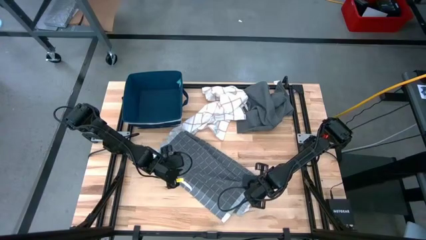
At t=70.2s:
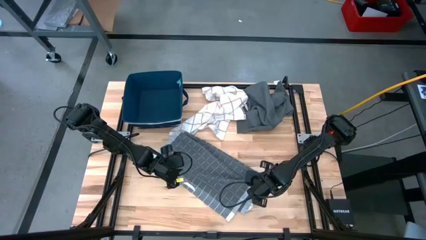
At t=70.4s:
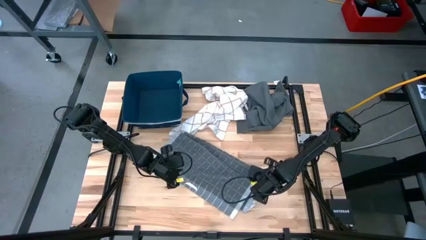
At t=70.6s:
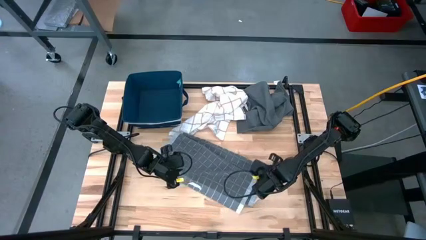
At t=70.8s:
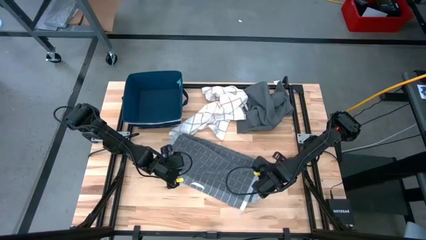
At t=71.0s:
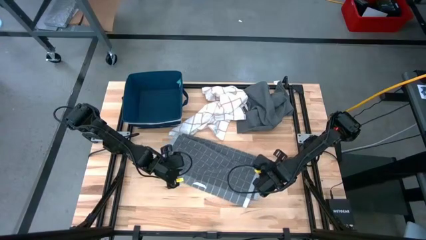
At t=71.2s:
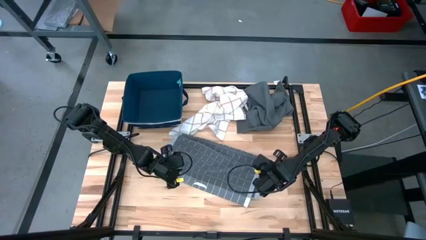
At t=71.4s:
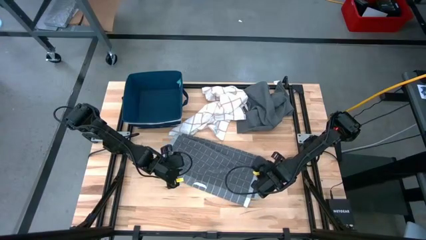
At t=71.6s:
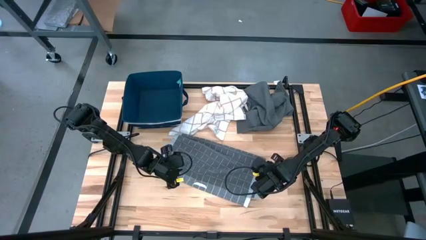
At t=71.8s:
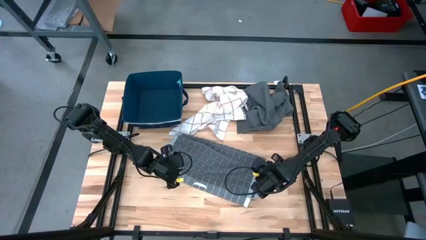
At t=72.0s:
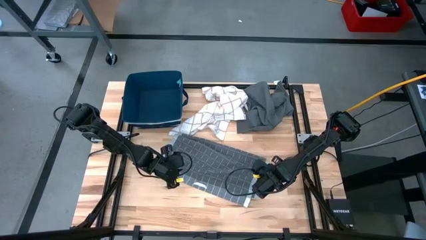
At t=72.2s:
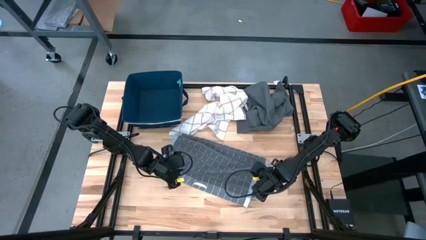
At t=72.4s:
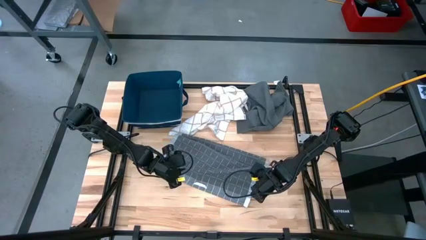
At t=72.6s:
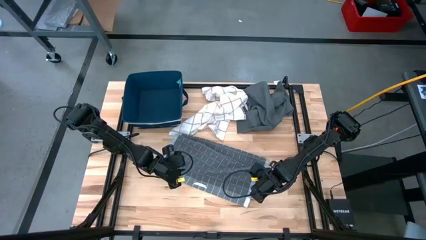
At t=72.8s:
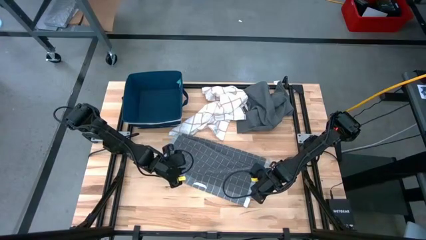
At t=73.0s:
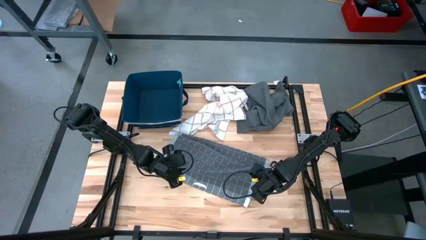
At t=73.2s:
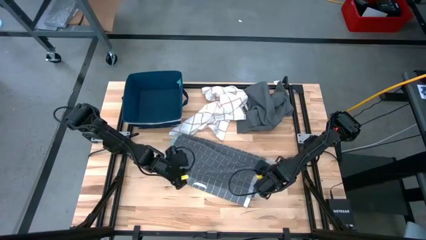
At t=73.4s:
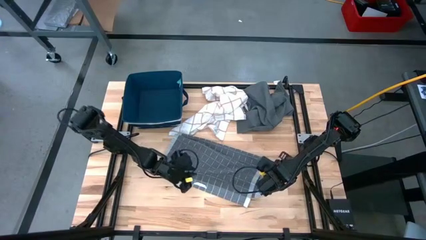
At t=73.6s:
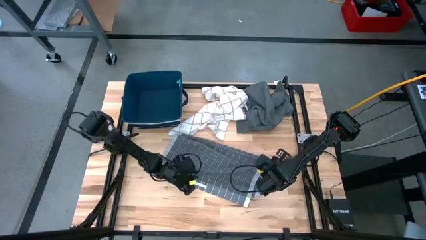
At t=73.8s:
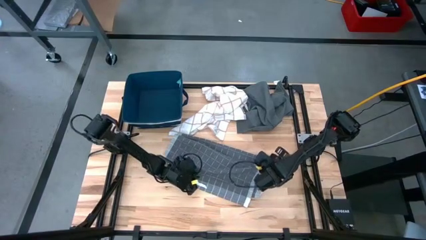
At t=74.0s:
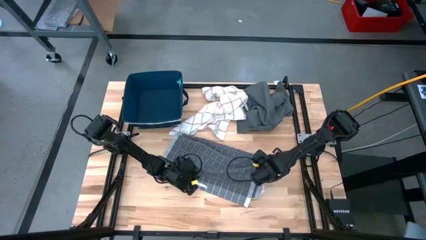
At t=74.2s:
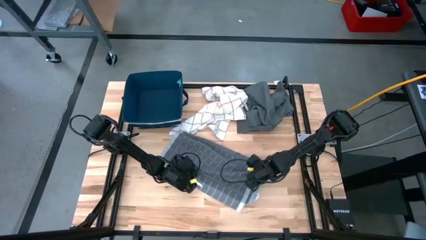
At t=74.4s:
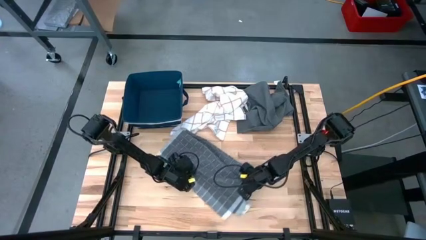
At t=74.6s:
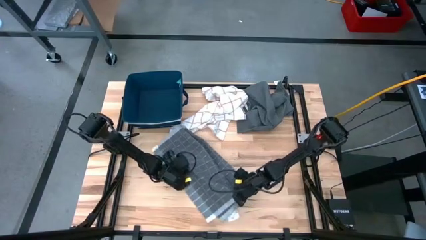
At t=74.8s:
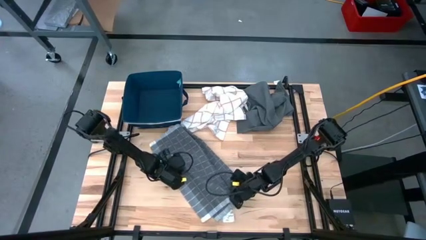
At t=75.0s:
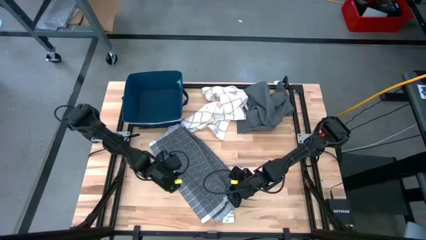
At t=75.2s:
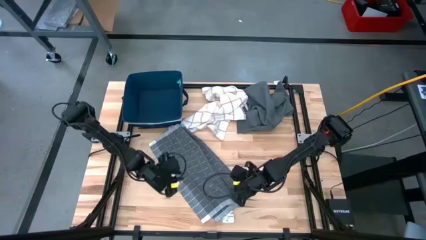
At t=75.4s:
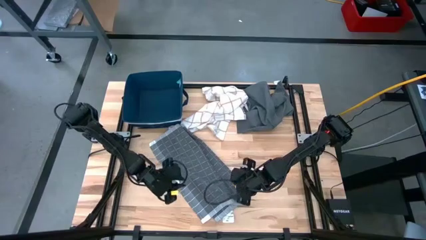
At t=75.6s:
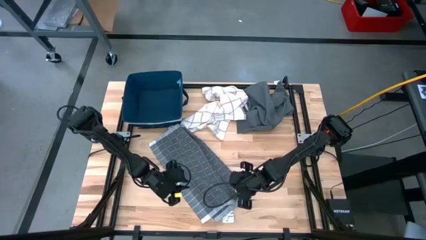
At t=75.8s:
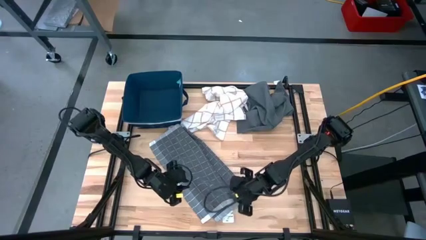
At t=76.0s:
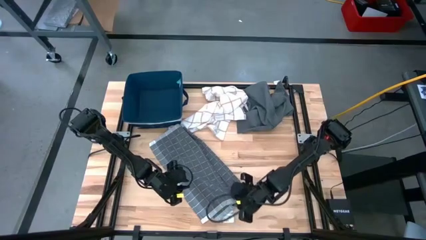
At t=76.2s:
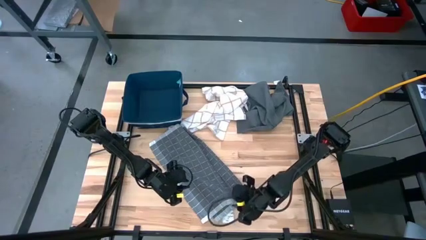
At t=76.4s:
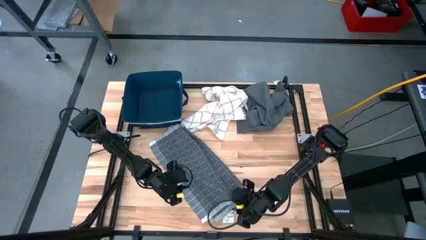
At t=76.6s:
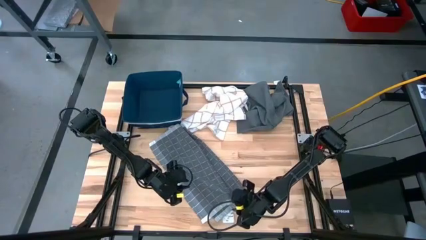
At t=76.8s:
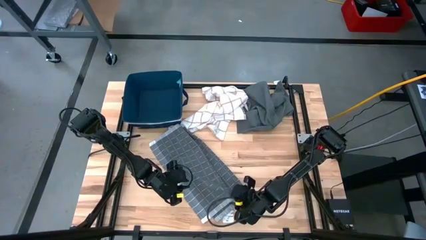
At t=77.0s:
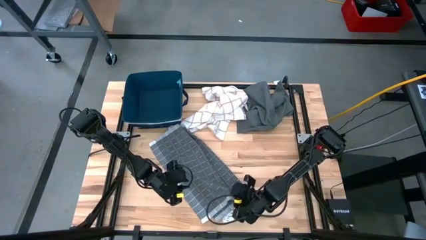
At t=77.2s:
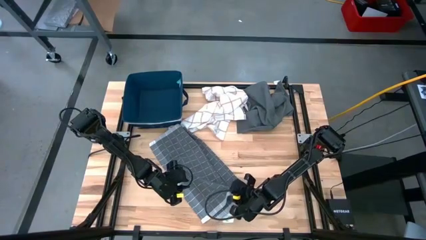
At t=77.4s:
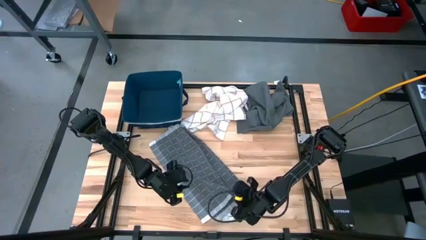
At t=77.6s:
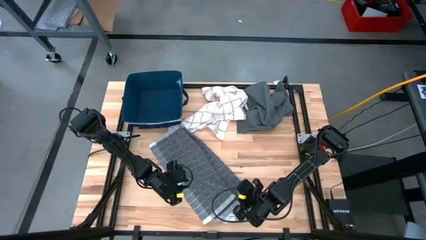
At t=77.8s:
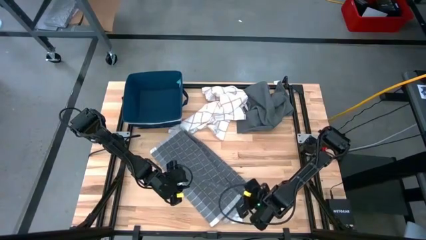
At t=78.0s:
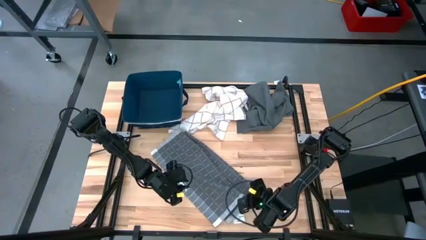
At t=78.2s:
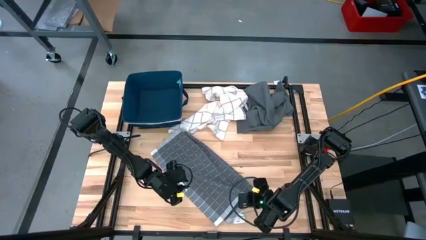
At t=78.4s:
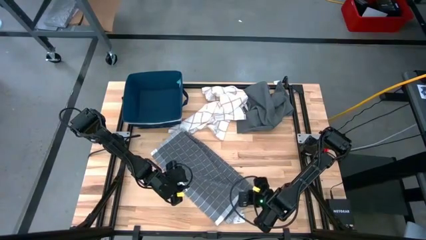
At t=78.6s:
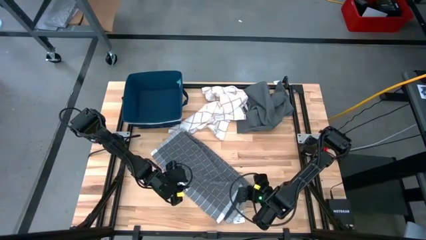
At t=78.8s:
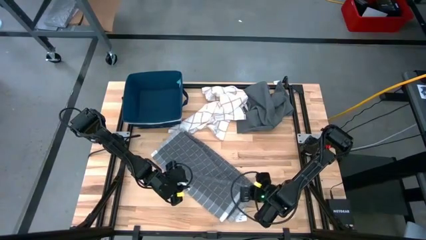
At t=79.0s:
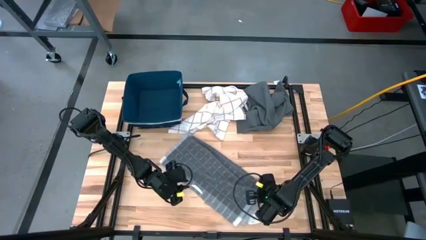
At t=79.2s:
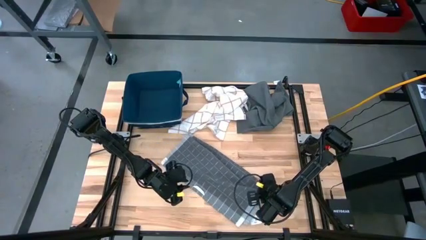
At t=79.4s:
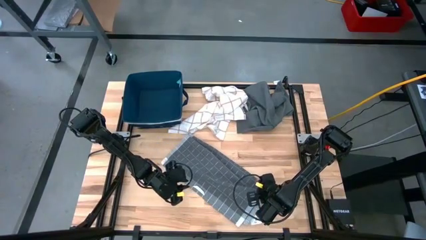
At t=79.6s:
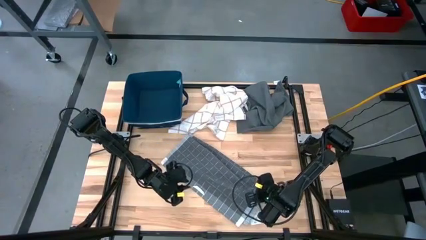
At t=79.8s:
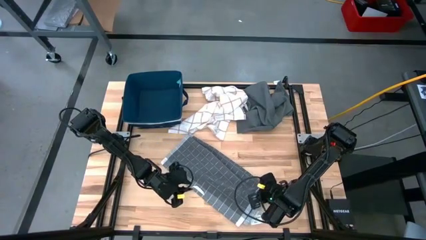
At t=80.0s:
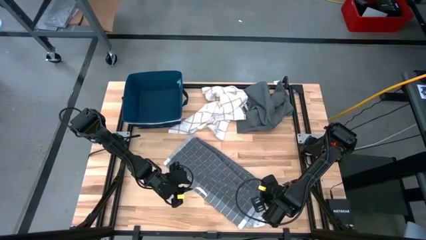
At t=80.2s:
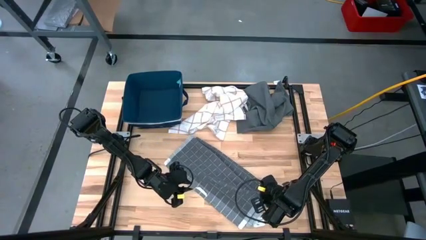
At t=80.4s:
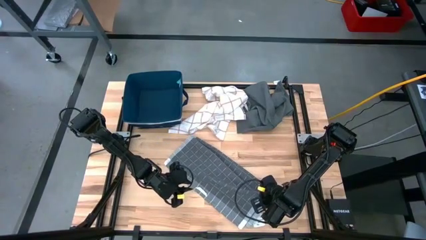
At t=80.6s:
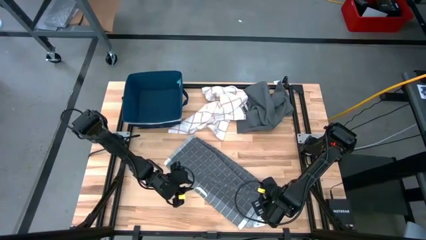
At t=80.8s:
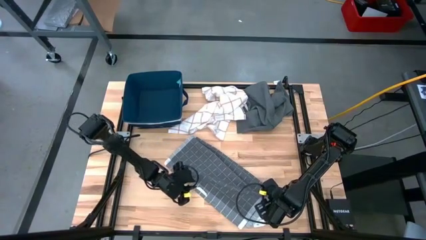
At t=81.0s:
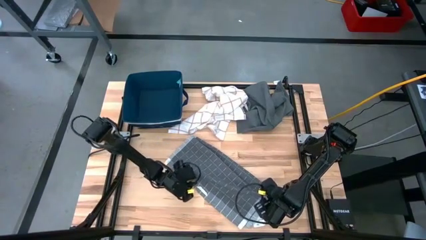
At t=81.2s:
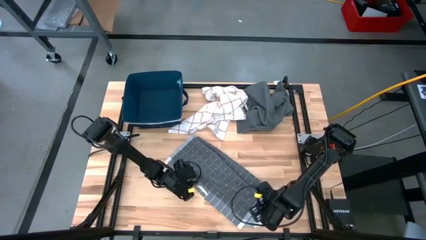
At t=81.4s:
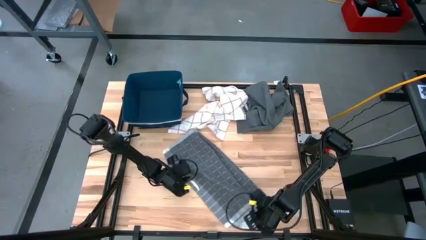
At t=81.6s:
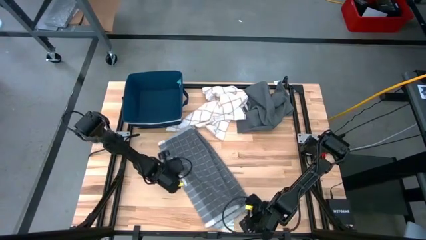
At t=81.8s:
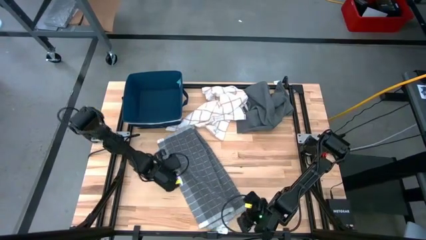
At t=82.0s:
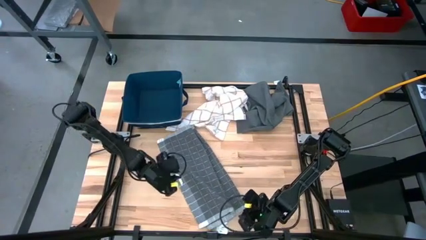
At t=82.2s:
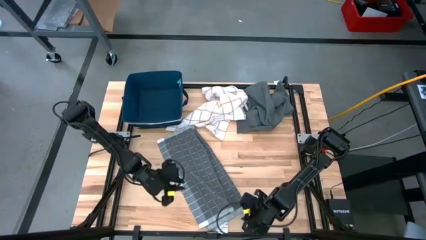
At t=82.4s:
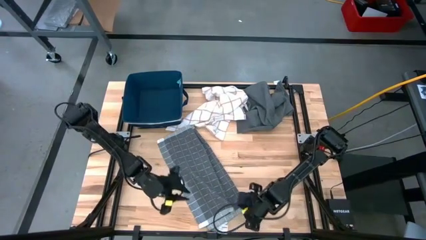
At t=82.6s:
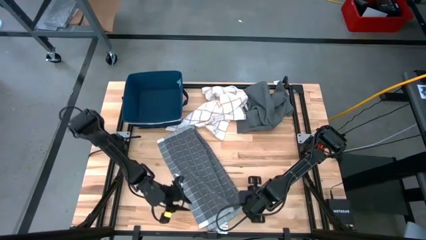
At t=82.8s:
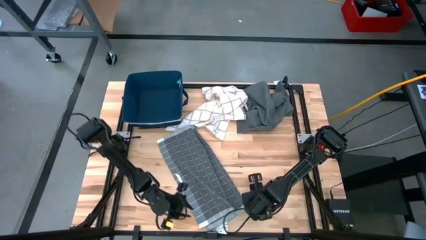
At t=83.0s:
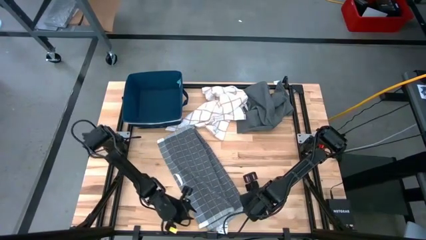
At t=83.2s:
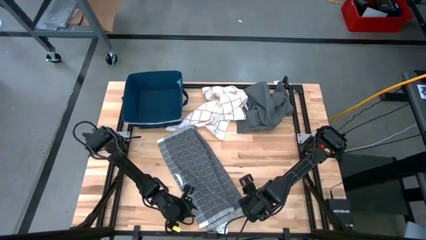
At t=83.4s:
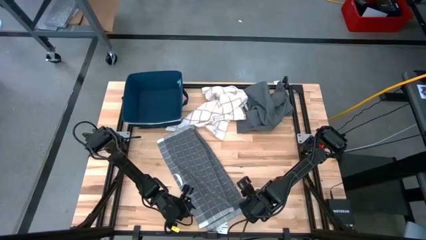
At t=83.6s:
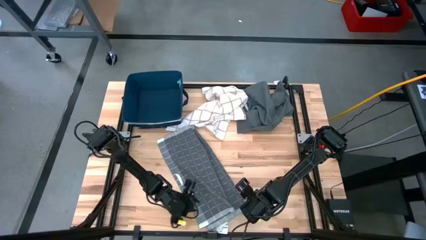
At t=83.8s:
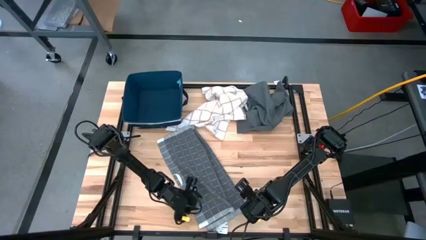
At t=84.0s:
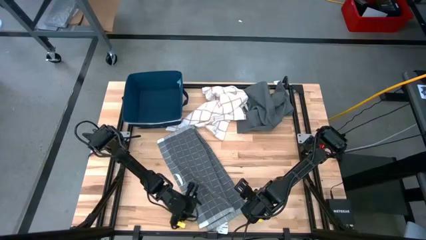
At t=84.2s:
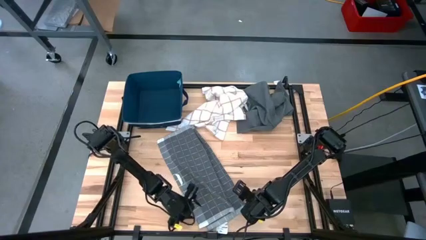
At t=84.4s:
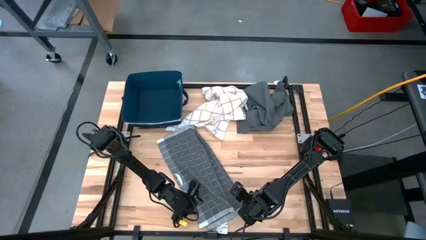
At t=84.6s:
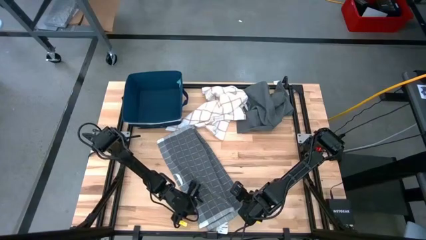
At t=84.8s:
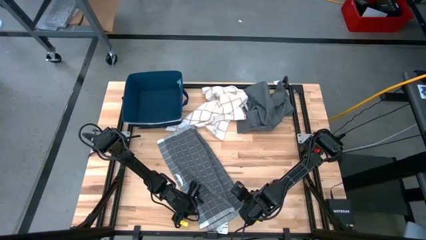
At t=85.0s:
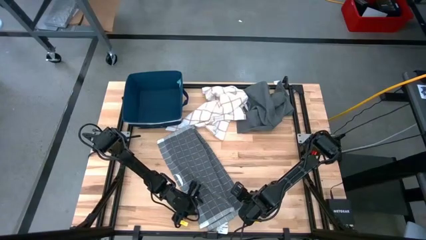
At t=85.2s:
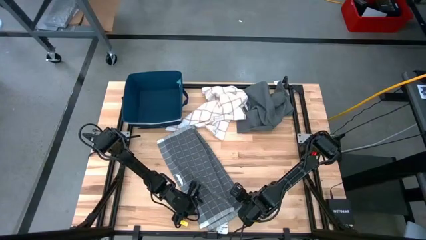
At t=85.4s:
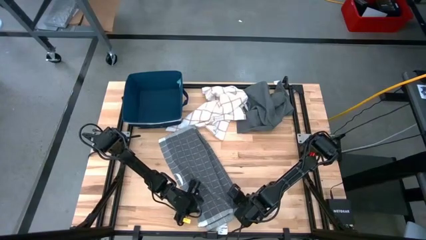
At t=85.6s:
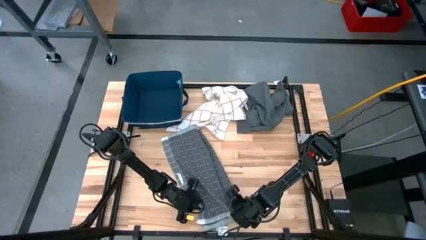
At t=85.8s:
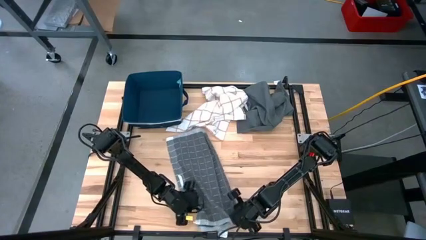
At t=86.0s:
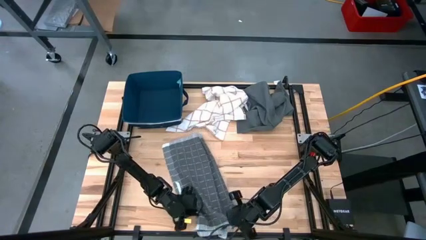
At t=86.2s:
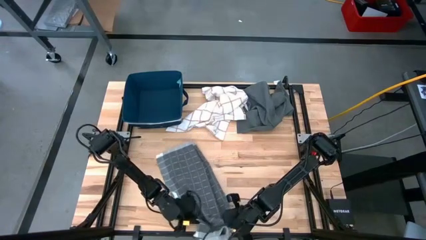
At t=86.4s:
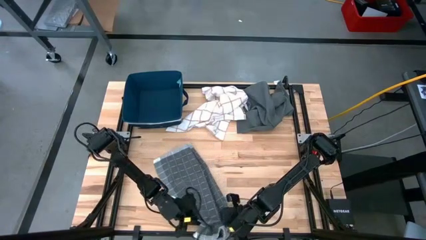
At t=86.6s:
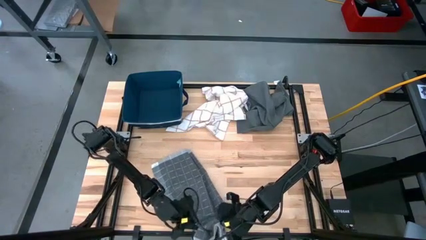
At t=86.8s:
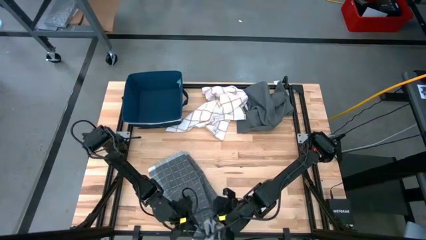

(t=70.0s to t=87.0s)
Task: Fold towel
Fold the gray patterned towel
